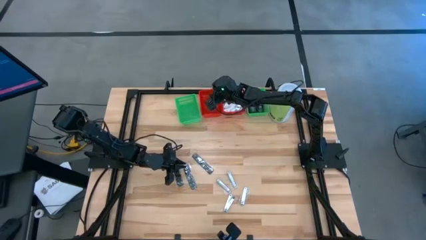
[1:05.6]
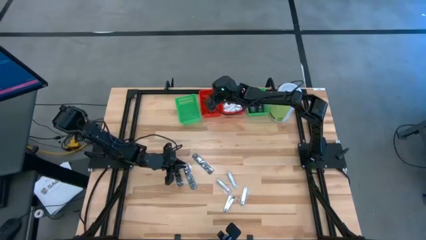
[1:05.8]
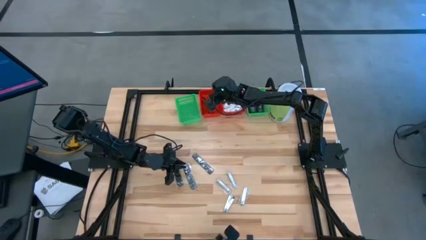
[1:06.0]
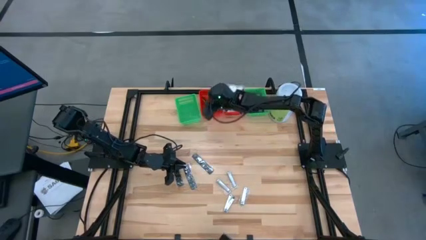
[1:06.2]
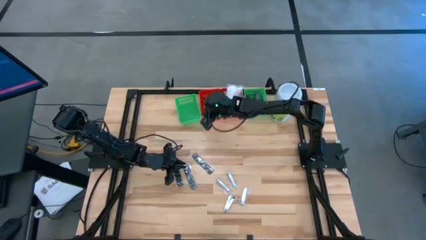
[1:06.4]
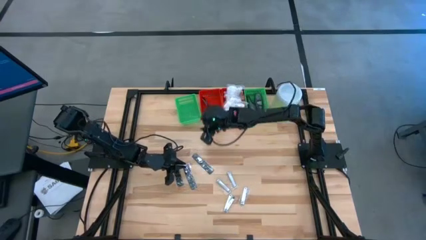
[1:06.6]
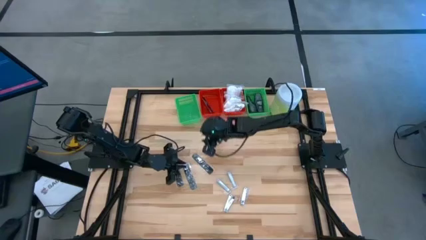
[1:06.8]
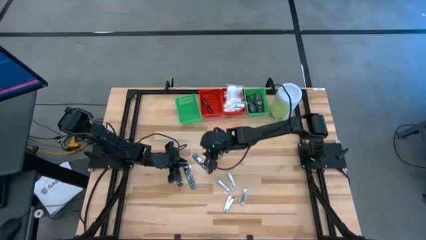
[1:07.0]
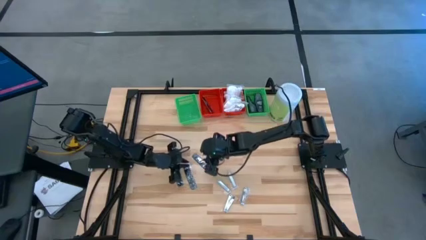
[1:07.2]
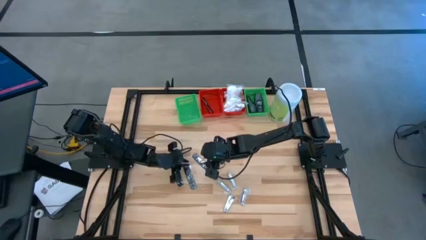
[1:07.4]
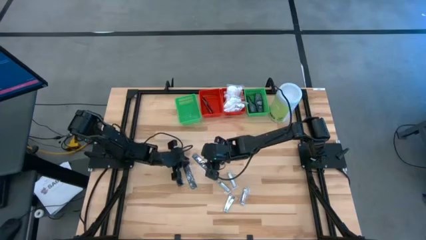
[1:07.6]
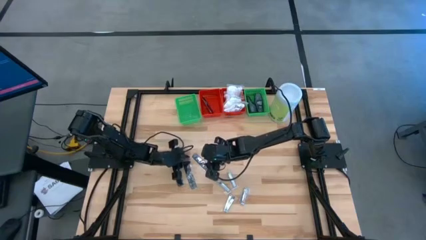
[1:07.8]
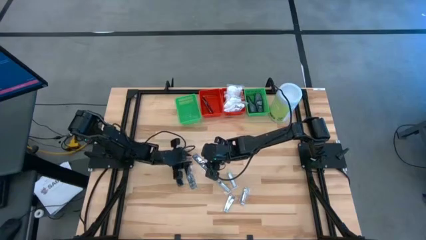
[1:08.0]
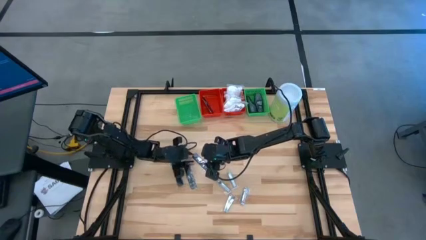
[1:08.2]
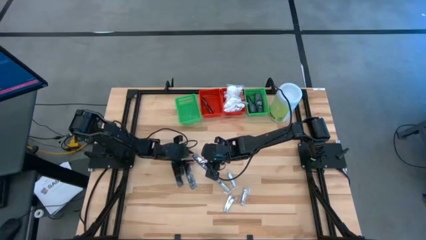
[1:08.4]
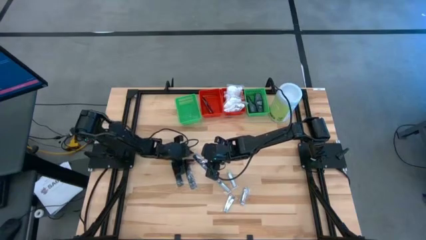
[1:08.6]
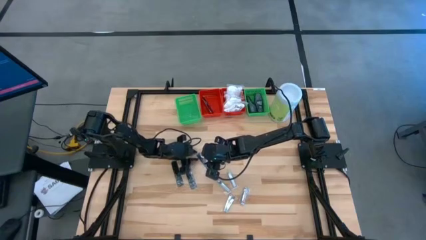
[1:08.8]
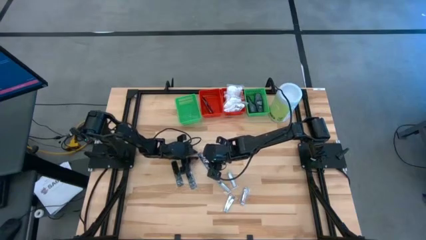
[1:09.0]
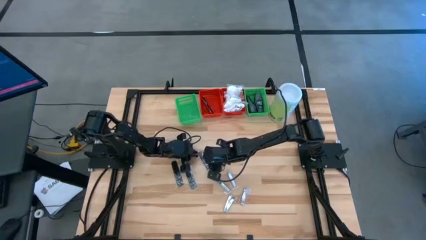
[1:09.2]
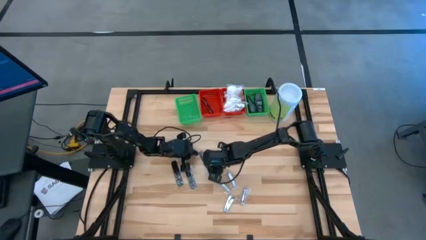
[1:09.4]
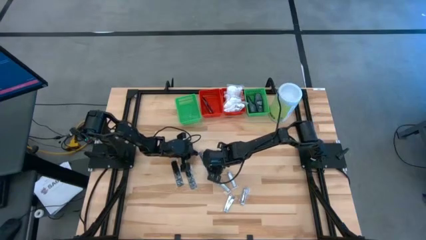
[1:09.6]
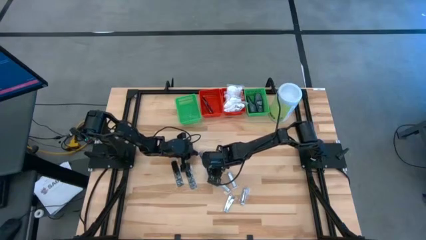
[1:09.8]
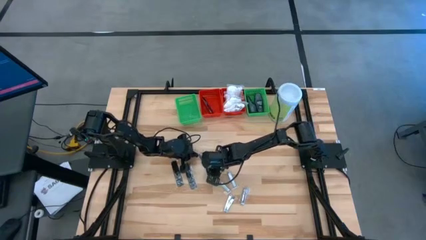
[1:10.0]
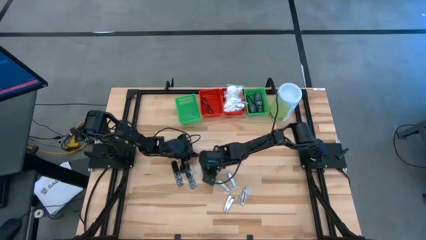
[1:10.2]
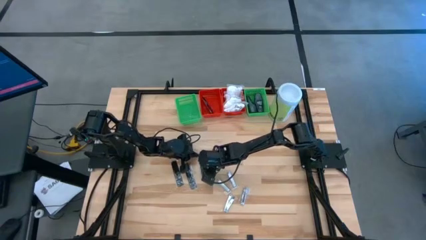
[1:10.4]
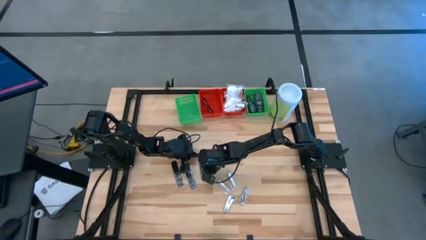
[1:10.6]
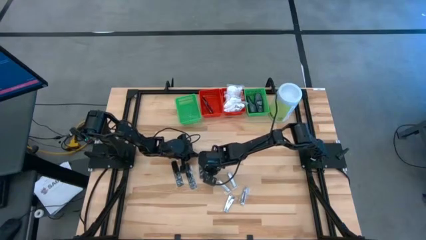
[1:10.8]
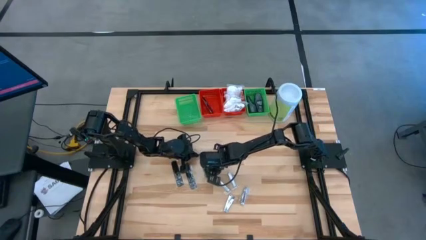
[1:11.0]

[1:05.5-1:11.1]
Task: Pick & Place Travel size toiletries
Put the black comb into the left red bin

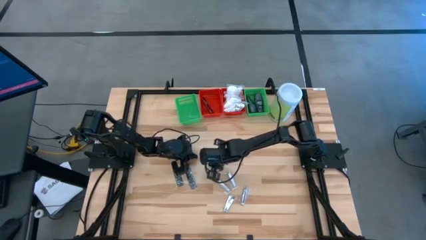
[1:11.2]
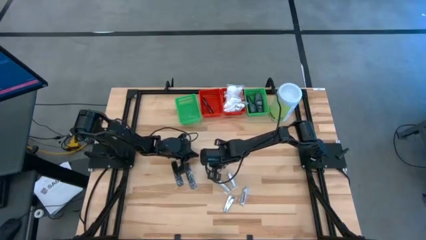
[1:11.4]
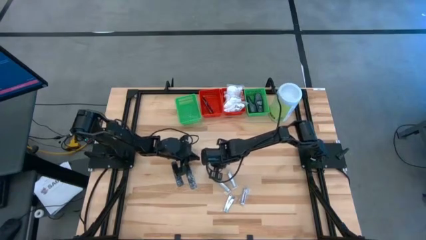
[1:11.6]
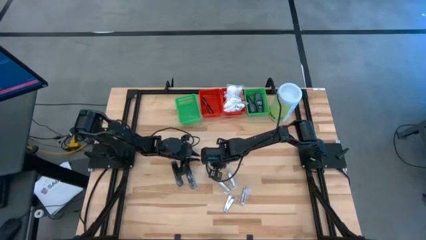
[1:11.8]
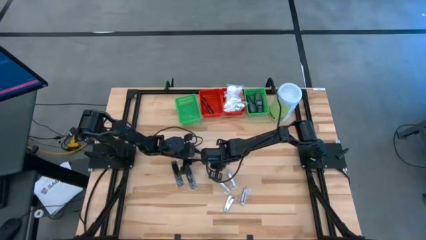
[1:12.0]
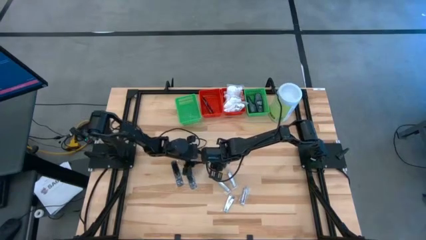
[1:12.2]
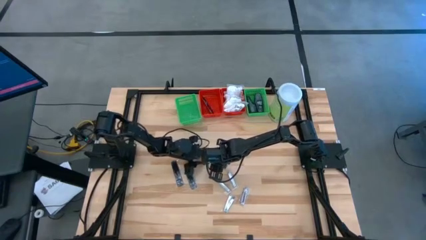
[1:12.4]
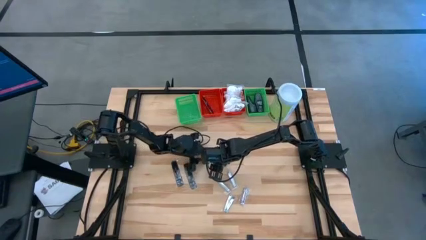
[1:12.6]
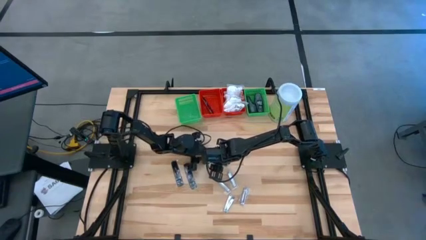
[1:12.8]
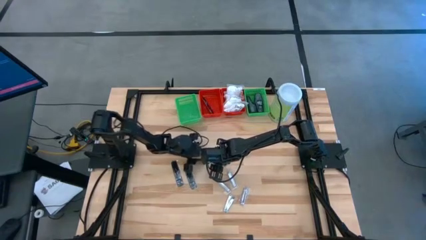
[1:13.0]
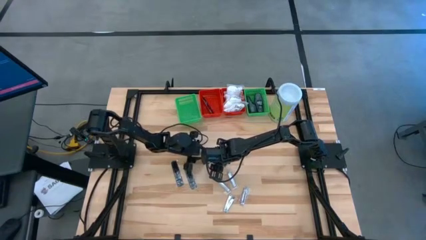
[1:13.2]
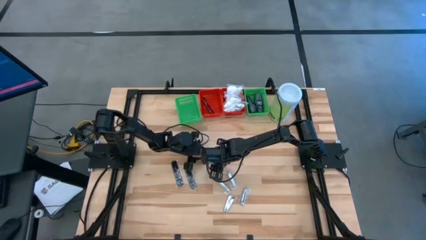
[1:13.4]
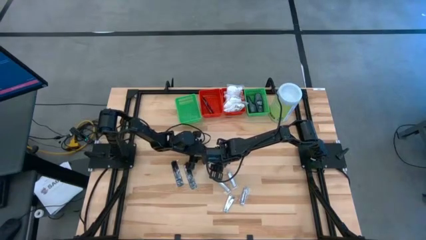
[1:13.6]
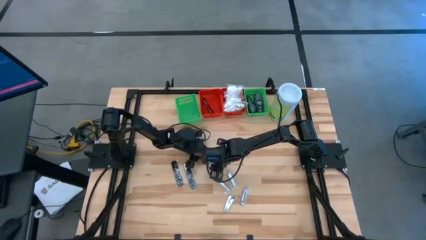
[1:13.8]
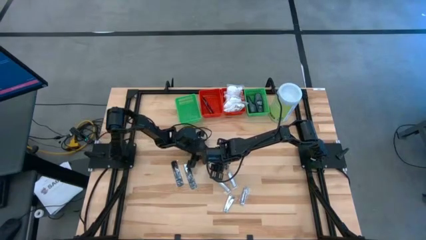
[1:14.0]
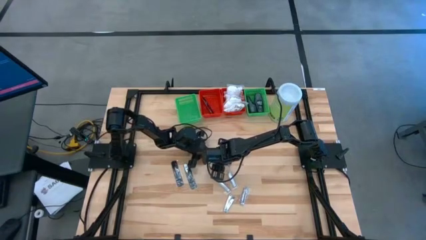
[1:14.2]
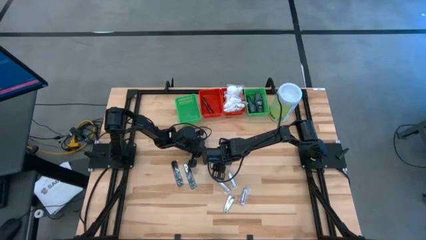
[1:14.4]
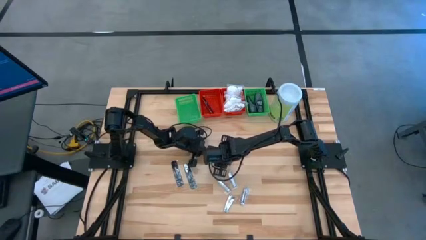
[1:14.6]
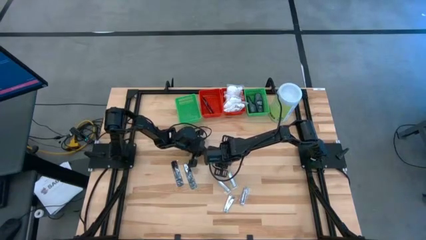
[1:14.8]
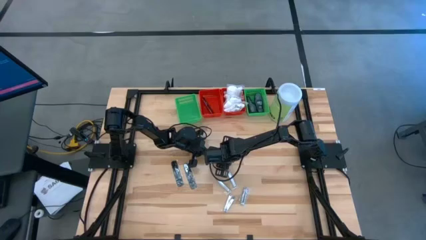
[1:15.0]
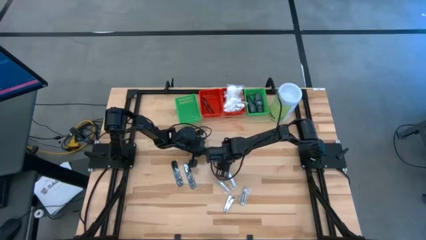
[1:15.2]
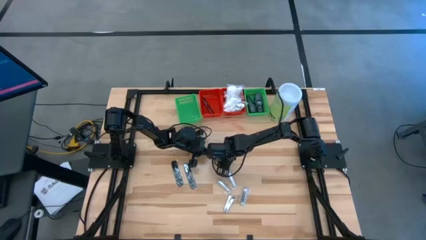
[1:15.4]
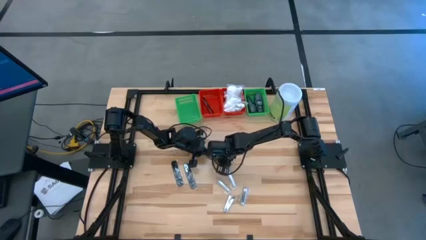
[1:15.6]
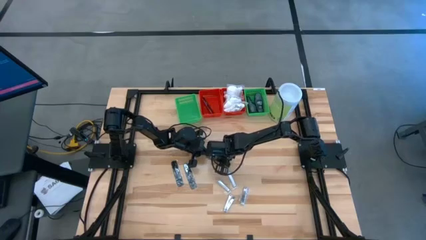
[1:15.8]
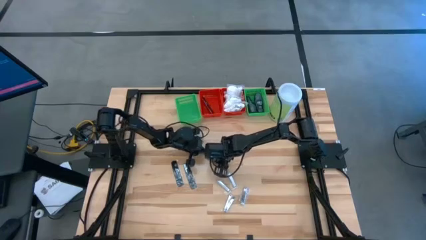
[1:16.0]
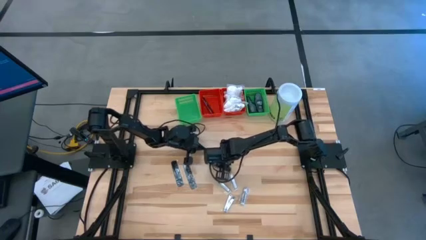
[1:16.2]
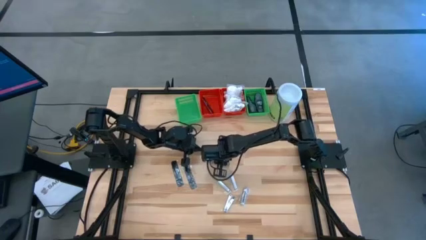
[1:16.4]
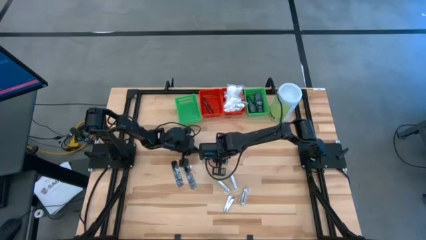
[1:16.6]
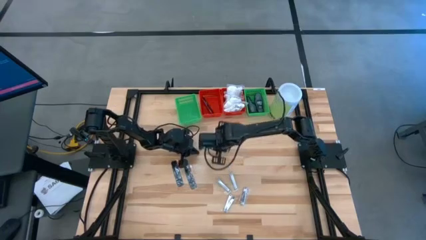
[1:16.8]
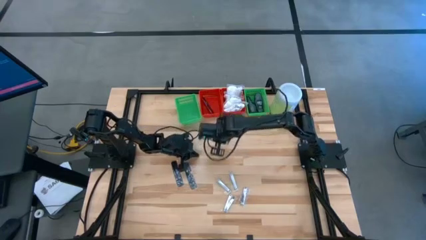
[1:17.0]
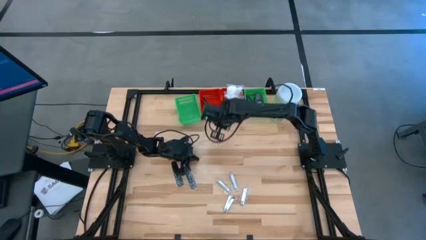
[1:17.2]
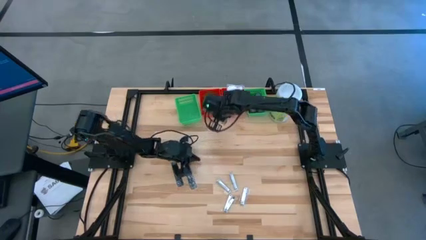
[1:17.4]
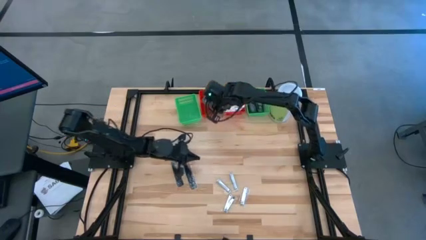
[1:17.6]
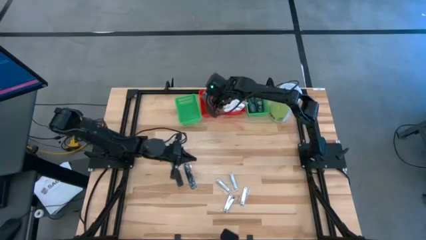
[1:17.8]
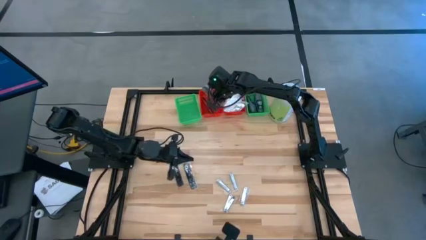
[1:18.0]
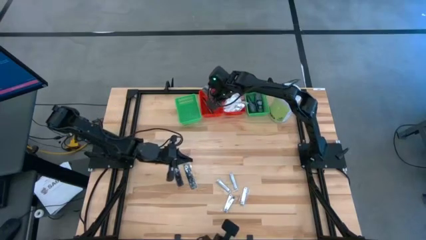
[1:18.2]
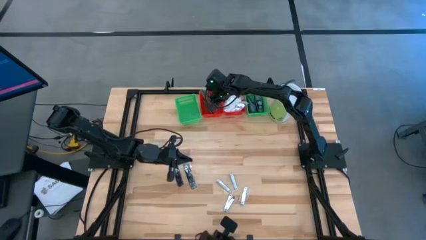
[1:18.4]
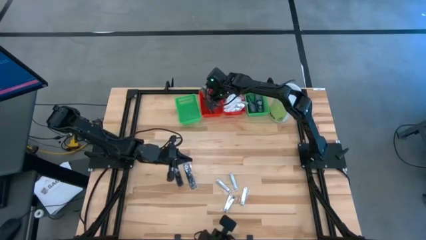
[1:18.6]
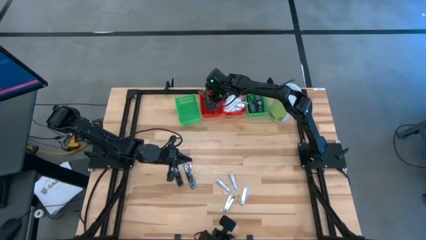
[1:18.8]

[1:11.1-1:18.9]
Put the black comb into the left red bin
